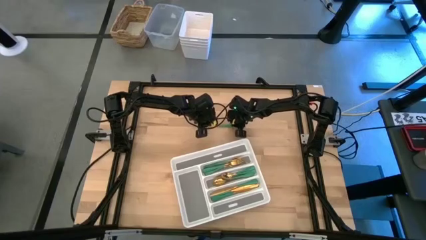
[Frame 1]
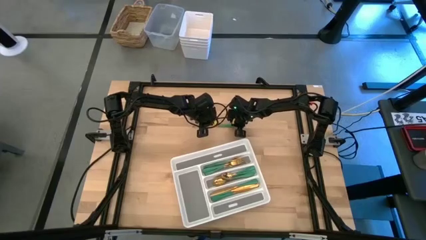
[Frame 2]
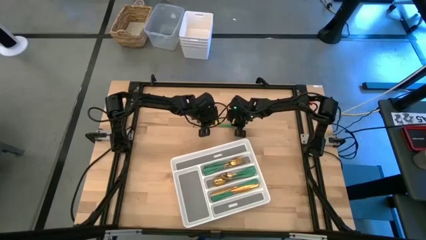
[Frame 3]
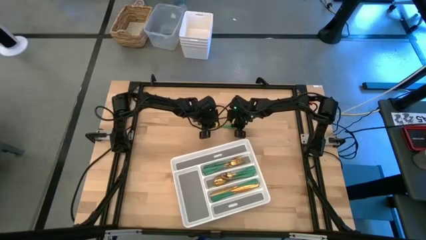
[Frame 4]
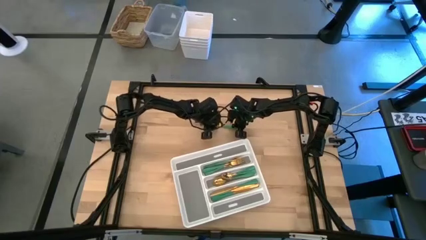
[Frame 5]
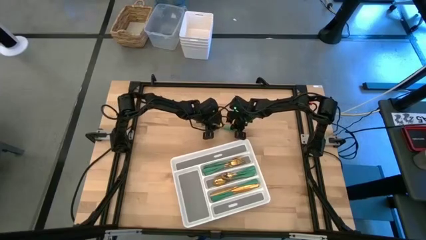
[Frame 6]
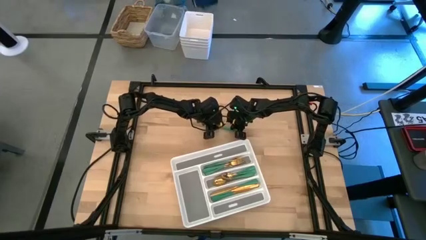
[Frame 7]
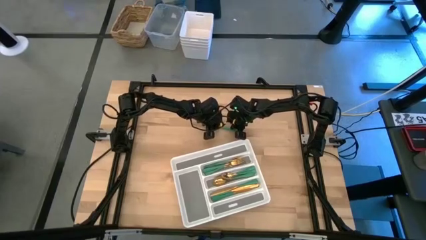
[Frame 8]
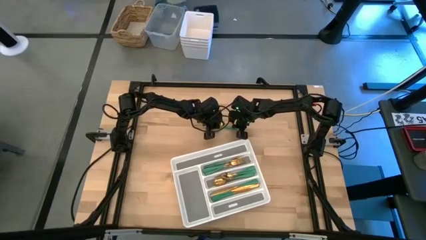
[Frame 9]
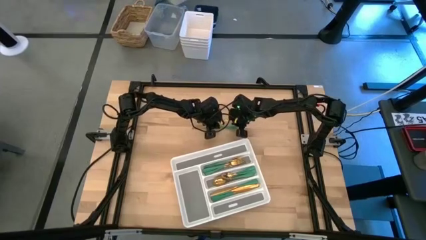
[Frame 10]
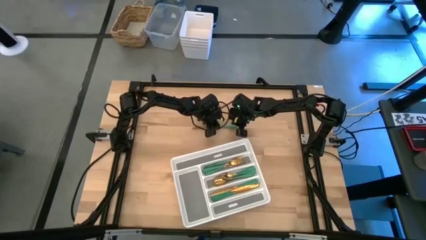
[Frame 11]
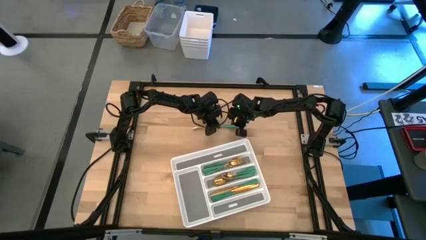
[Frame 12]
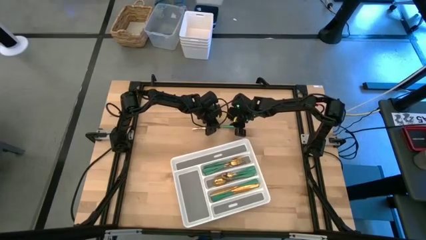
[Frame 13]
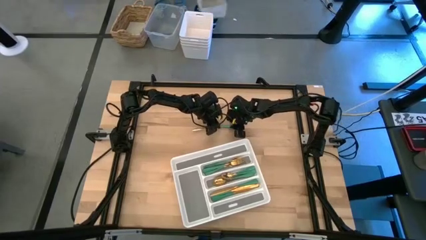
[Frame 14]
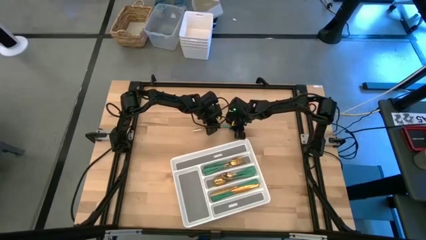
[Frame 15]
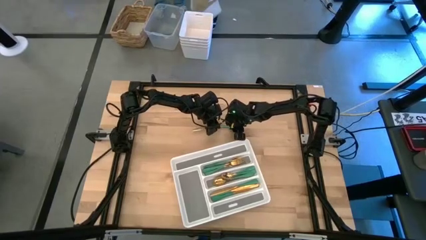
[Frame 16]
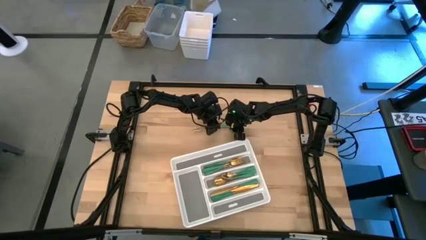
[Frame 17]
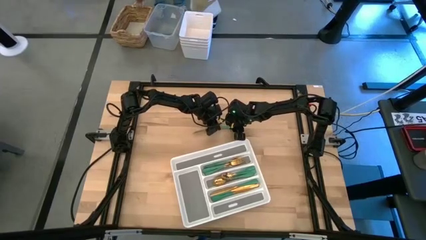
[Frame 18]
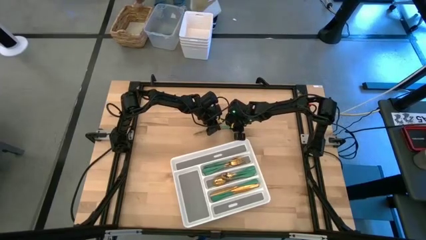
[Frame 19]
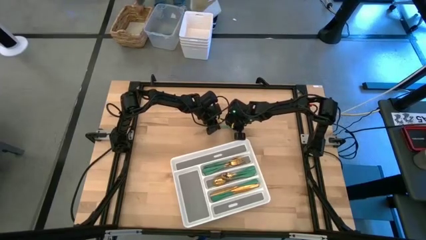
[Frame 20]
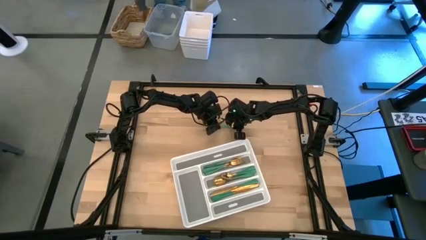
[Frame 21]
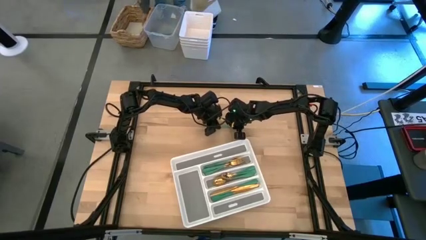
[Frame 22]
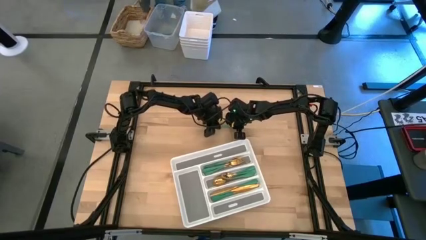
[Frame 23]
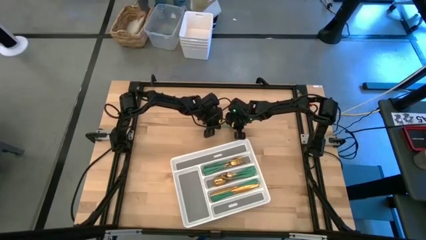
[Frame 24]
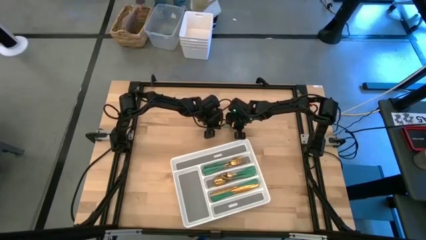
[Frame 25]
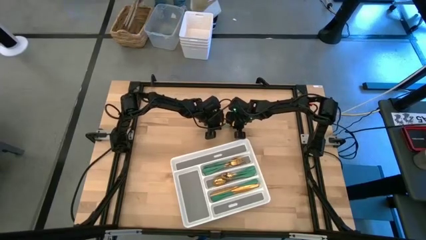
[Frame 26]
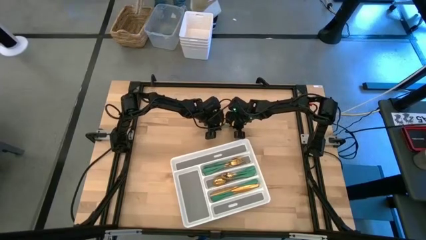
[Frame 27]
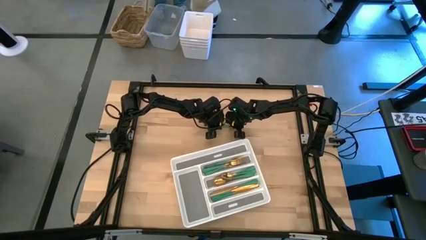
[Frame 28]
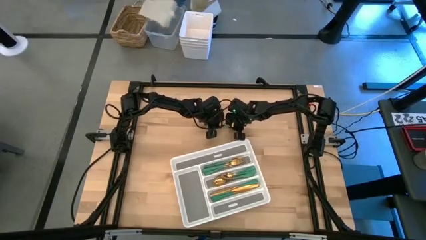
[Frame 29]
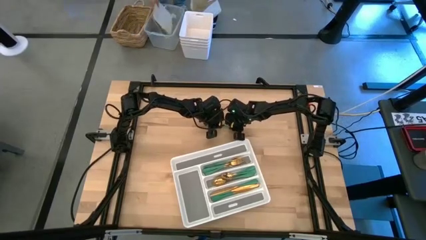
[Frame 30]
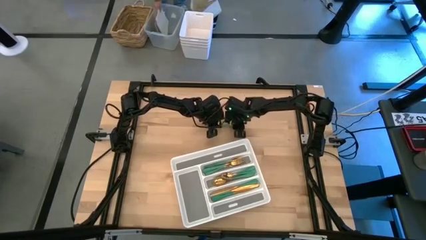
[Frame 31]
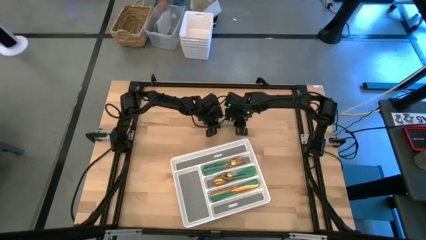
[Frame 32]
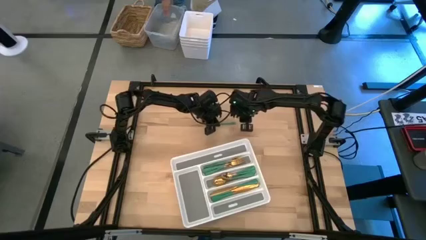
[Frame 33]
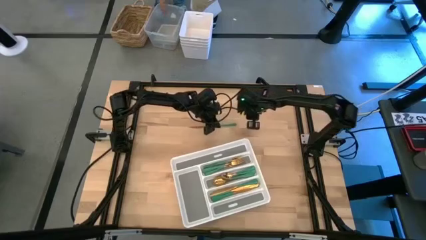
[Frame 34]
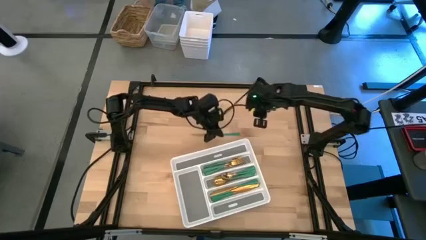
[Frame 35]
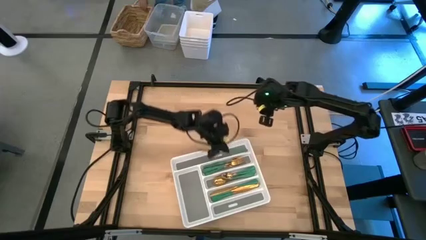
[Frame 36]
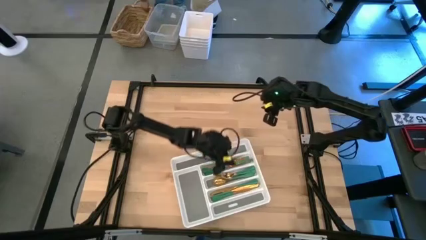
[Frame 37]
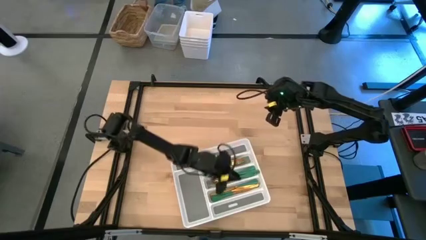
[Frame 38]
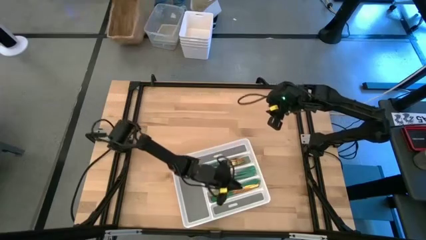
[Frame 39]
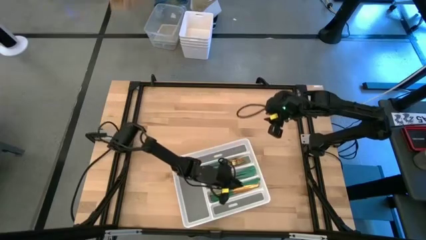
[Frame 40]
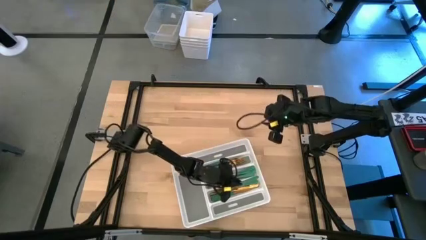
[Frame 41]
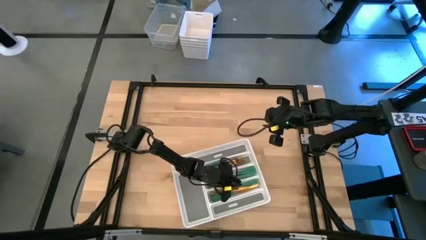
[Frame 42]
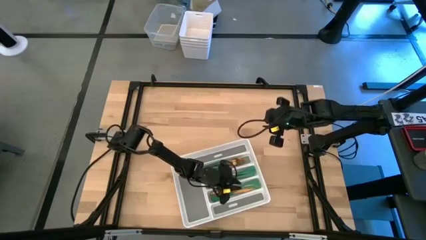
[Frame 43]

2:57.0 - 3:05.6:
Task: Sort silverware
Put the green spoon into the white silverware tray

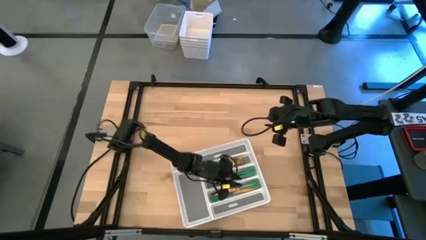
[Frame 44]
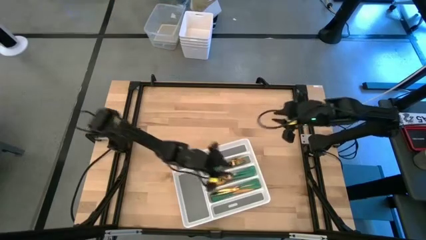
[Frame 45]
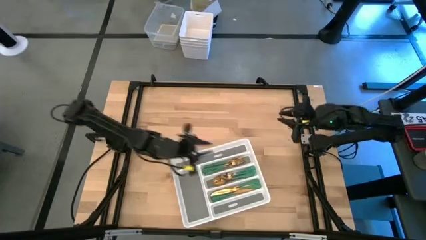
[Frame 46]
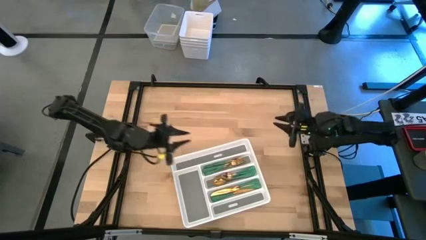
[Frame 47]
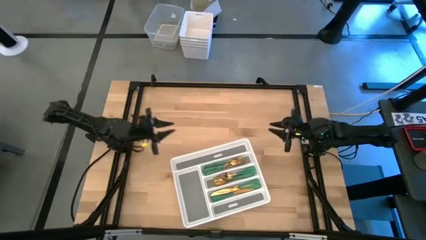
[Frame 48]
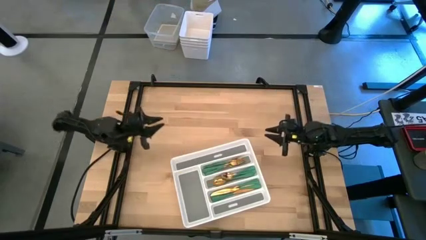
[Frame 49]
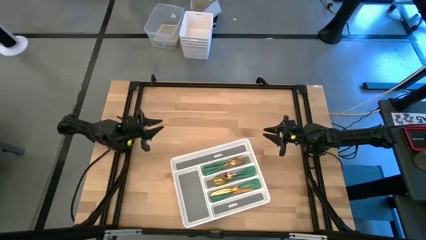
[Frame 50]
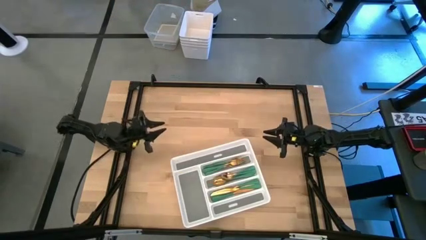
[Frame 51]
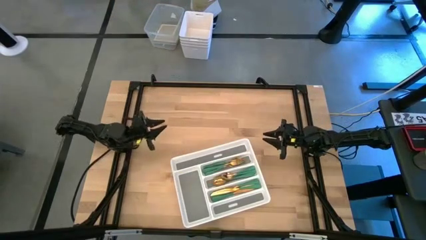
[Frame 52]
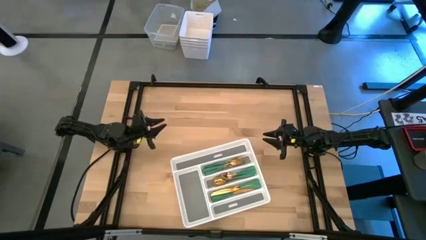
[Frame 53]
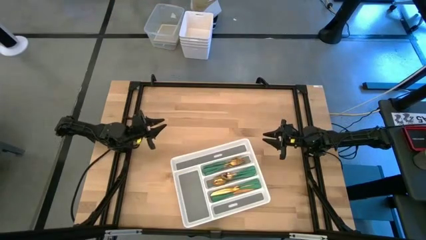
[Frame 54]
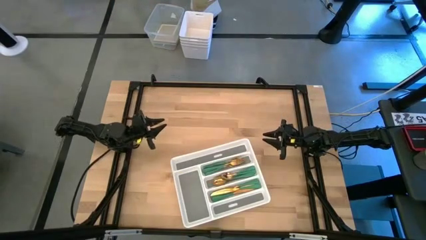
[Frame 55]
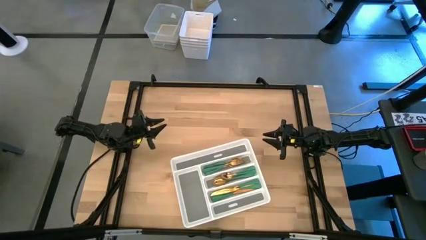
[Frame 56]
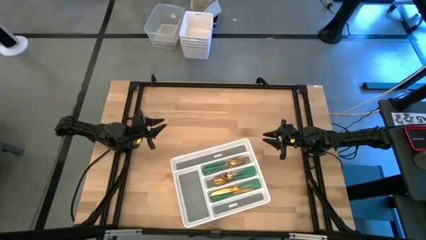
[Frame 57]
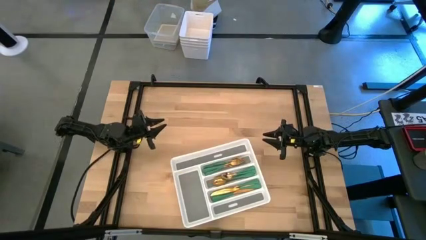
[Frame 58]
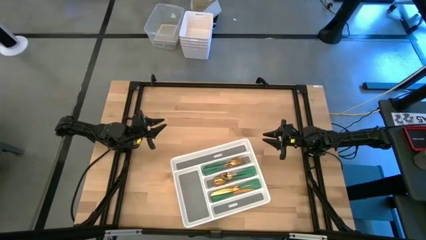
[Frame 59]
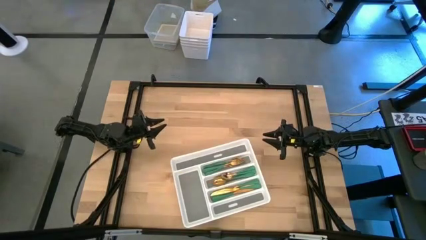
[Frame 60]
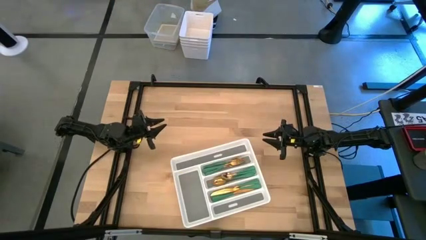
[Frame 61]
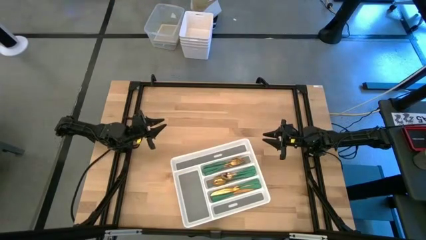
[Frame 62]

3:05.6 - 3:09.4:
Return to Home Position
